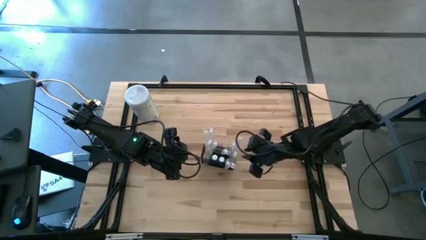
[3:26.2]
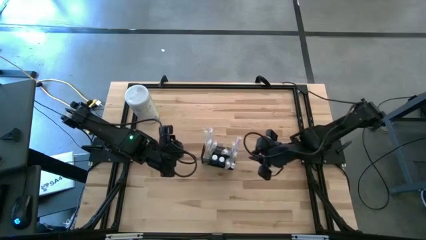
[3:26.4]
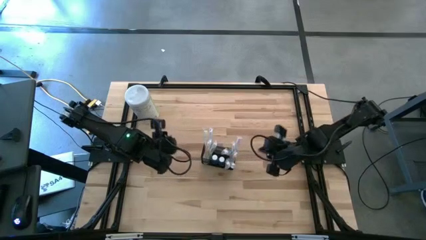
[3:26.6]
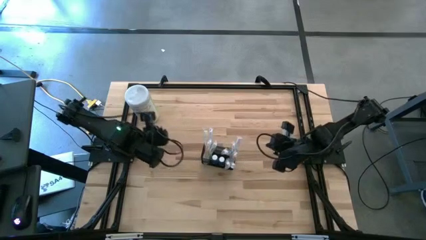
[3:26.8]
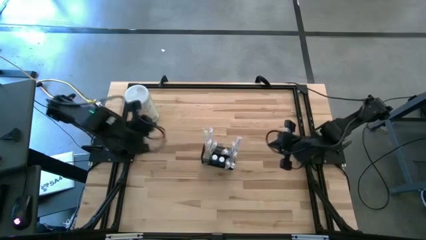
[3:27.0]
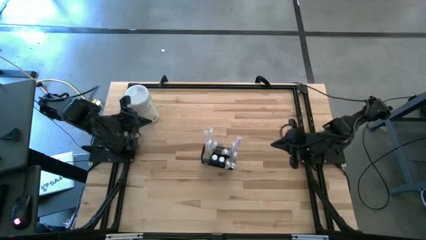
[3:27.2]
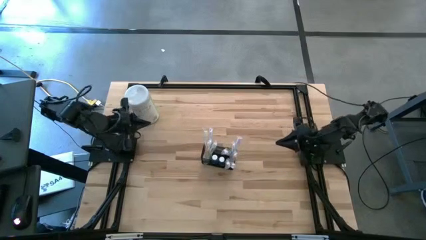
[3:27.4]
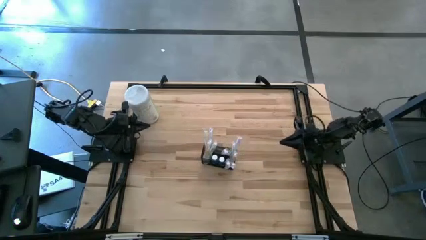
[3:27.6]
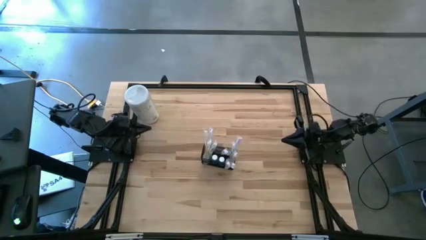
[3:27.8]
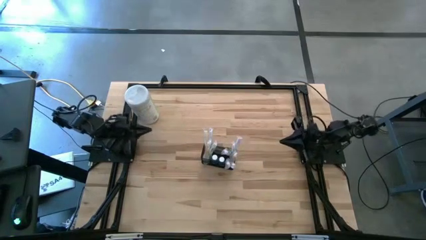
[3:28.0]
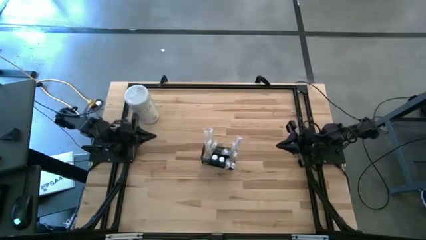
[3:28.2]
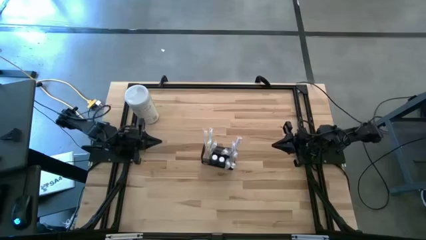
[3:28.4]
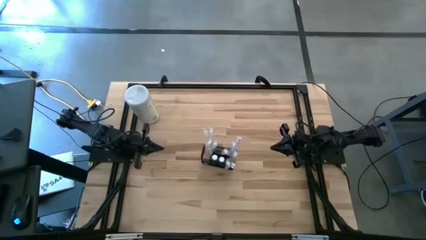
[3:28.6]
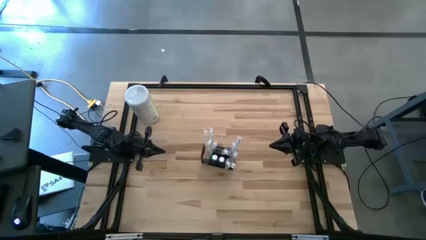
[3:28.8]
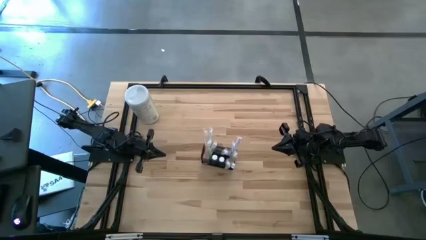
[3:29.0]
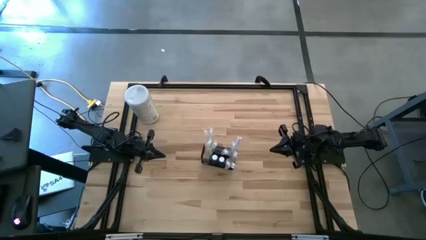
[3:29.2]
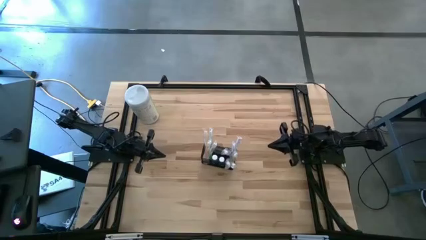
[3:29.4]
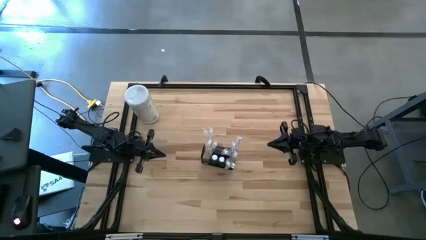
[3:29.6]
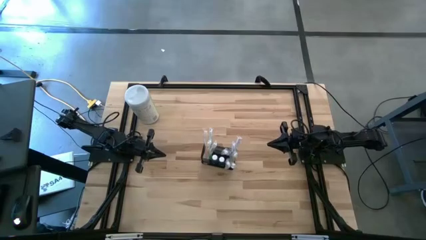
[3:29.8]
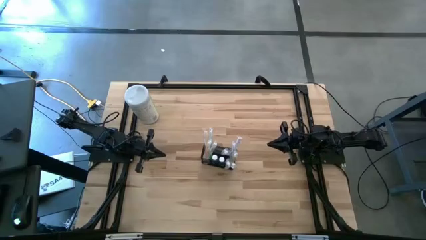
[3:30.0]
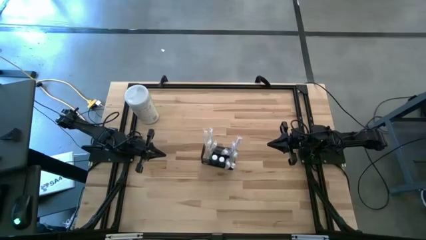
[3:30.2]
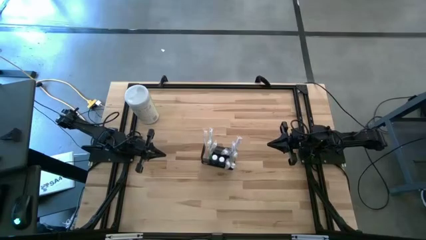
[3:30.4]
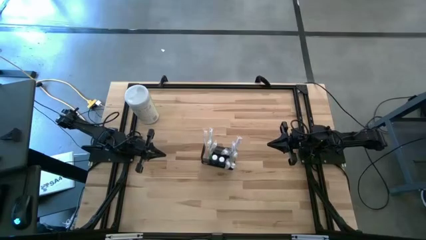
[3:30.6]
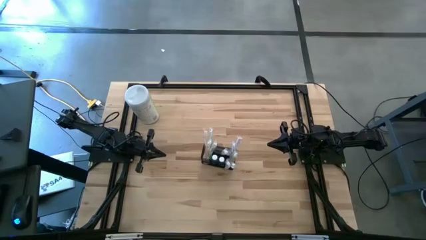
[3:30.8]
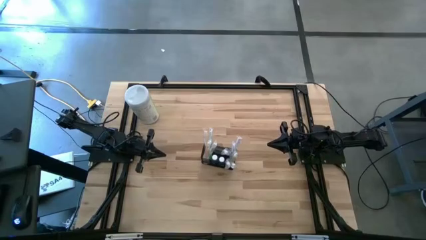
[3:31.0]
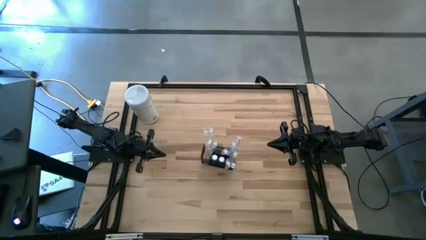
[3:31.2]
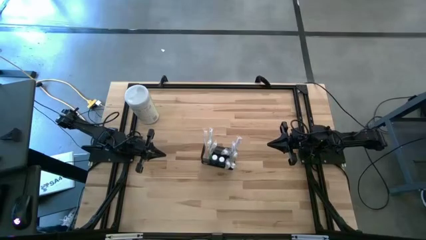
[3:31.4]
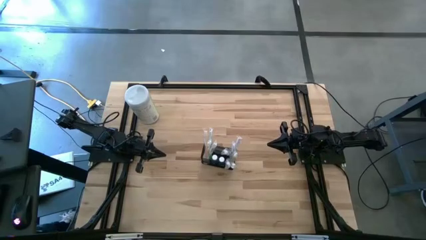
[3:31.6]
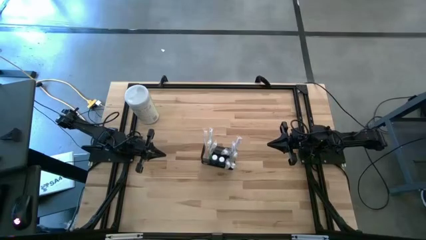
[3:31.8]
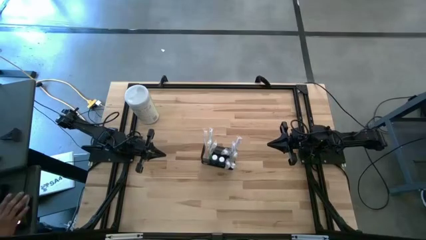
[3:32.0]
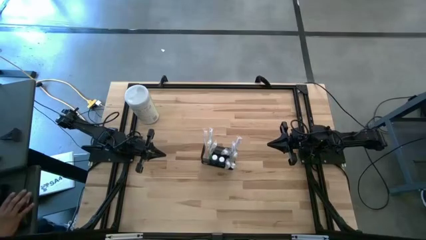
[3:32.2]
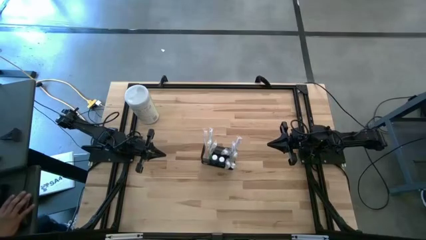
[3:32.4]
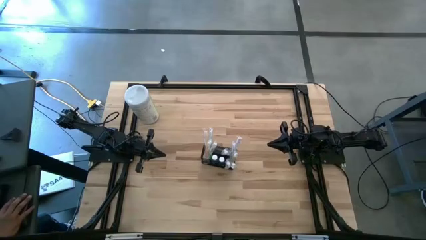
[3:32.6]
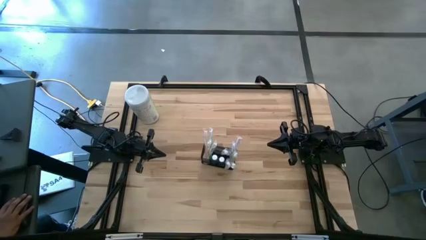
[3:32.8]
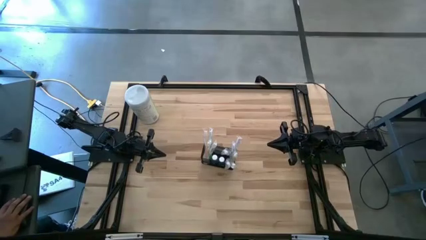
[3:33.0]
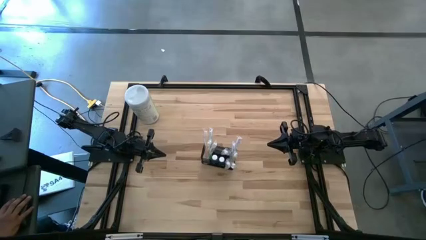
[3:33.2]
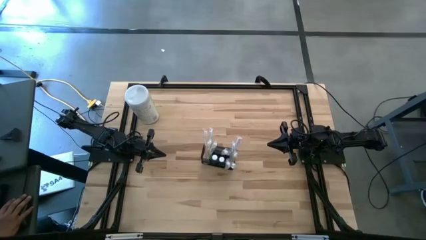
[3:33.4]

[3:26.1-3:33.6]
Task: Pick & Place toothbrushing station
Return to Home Position

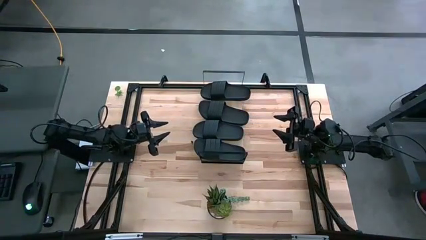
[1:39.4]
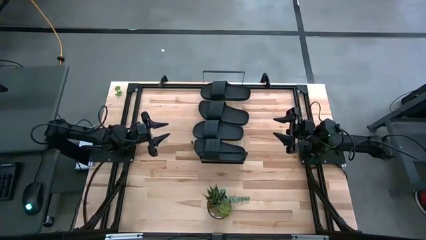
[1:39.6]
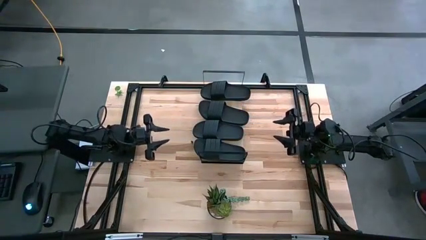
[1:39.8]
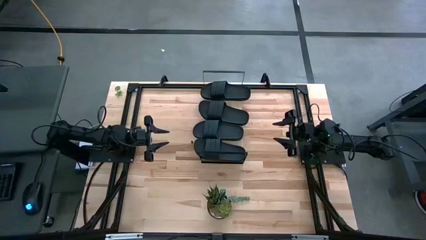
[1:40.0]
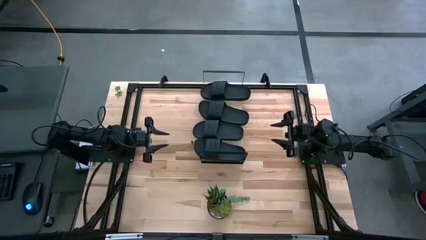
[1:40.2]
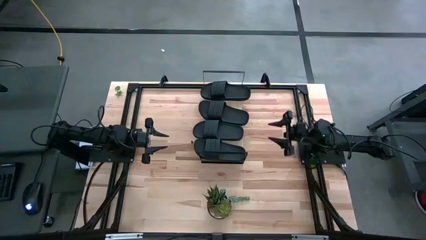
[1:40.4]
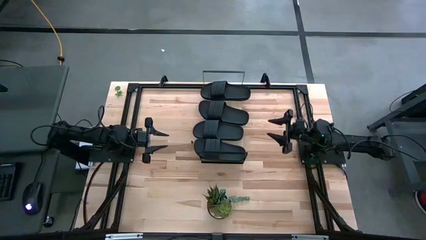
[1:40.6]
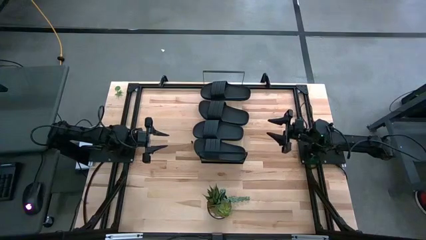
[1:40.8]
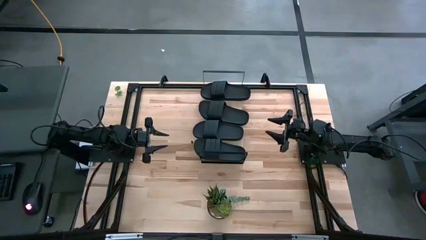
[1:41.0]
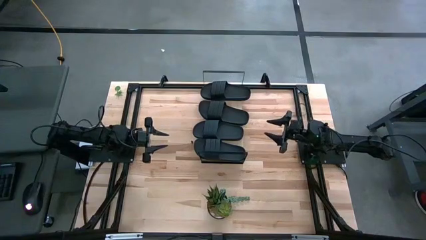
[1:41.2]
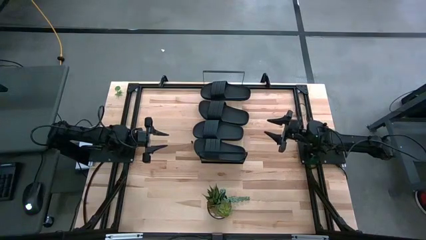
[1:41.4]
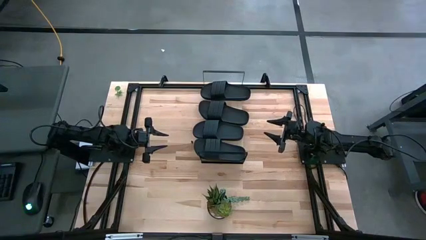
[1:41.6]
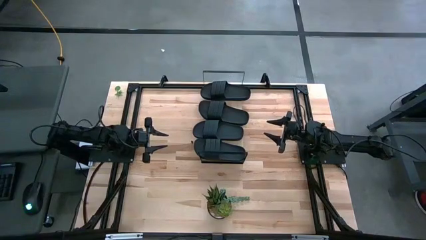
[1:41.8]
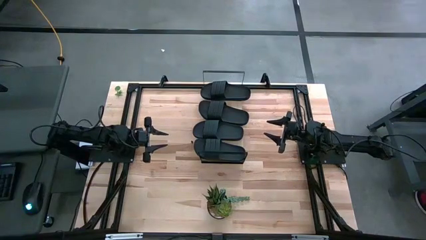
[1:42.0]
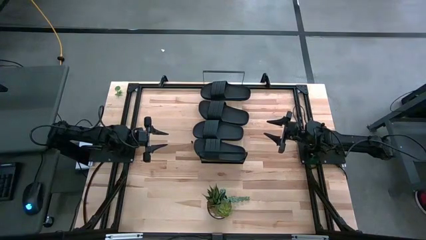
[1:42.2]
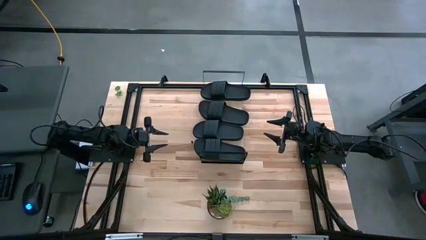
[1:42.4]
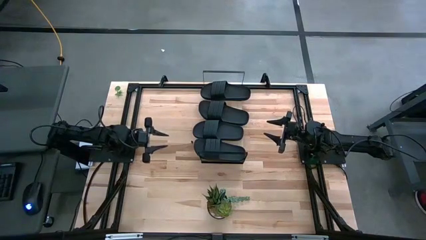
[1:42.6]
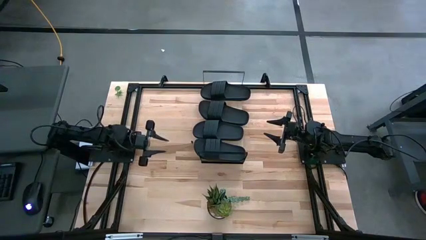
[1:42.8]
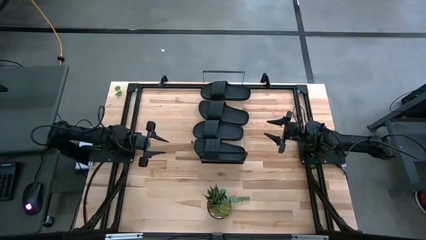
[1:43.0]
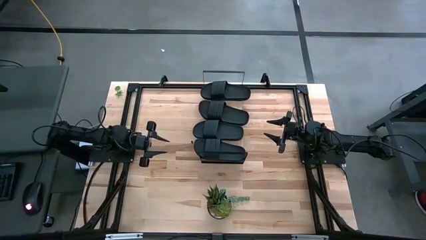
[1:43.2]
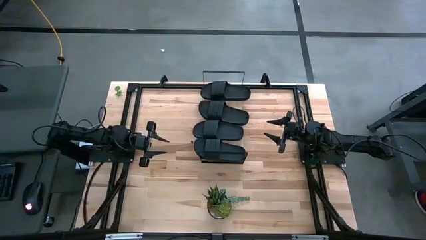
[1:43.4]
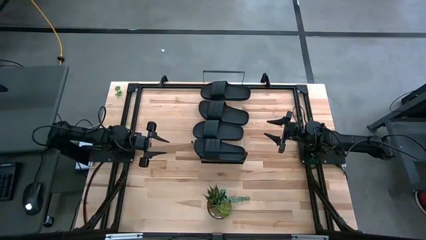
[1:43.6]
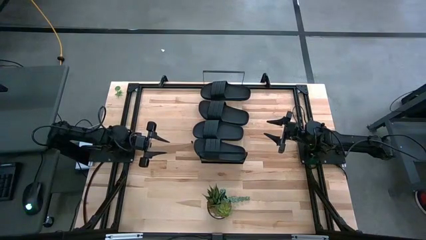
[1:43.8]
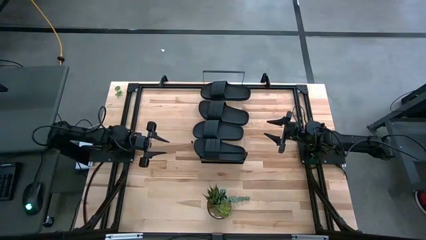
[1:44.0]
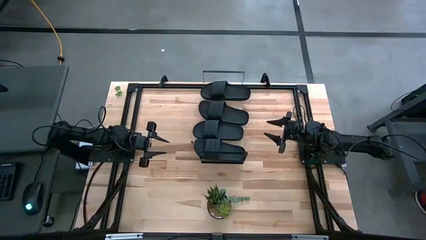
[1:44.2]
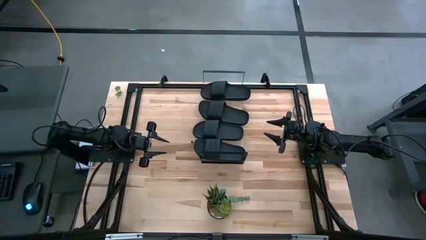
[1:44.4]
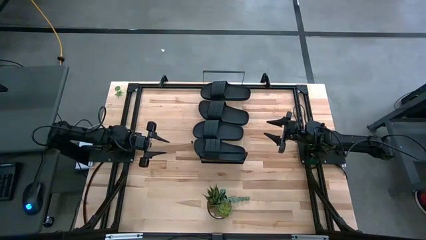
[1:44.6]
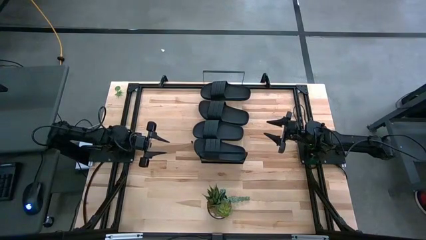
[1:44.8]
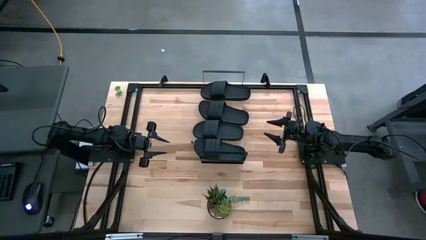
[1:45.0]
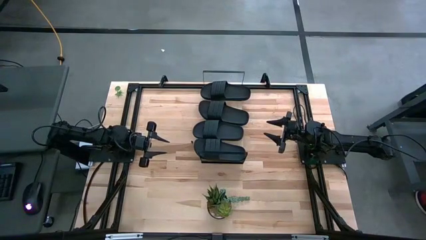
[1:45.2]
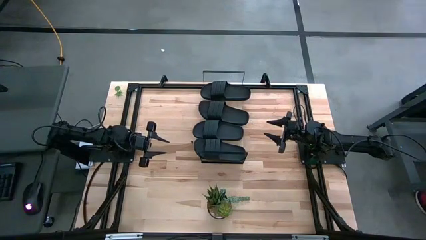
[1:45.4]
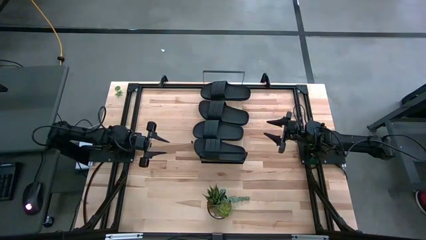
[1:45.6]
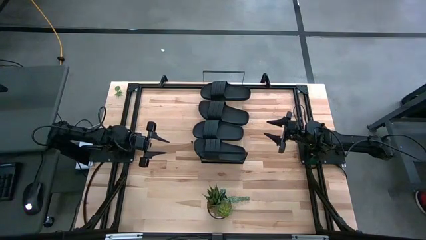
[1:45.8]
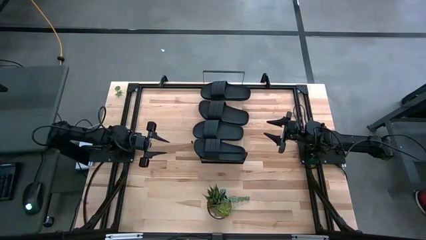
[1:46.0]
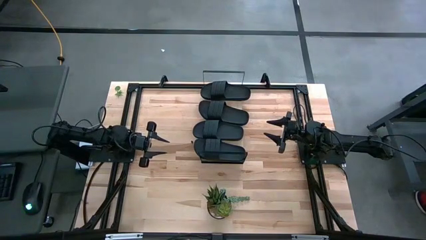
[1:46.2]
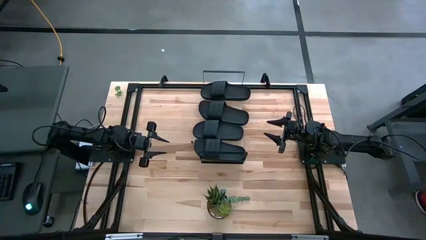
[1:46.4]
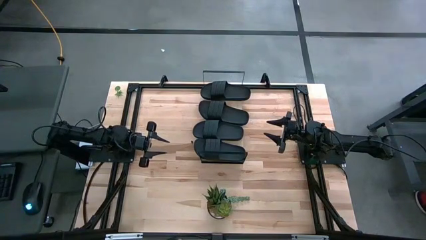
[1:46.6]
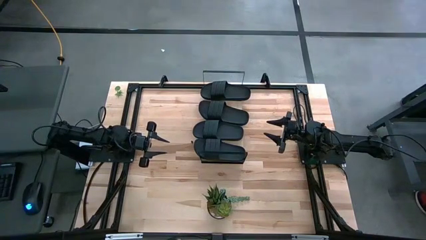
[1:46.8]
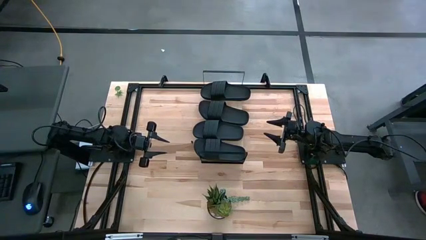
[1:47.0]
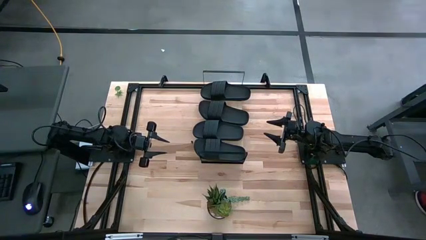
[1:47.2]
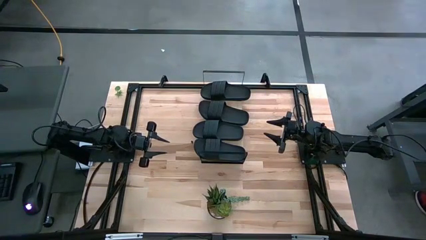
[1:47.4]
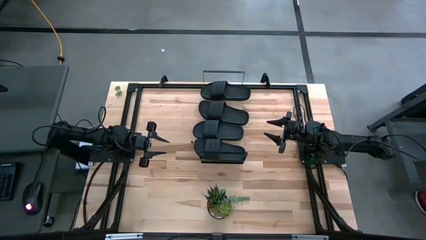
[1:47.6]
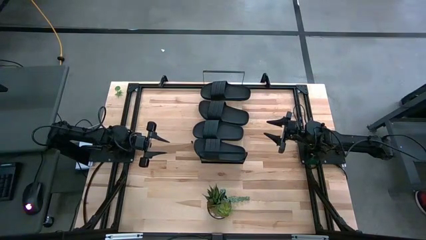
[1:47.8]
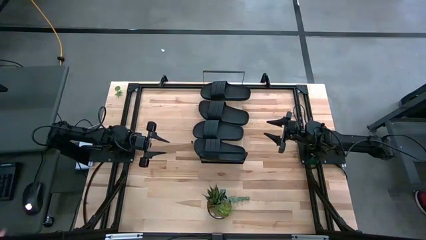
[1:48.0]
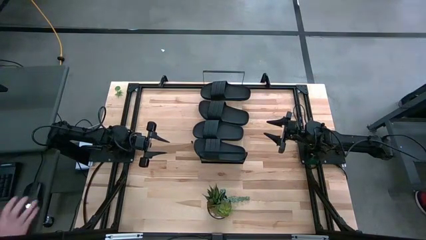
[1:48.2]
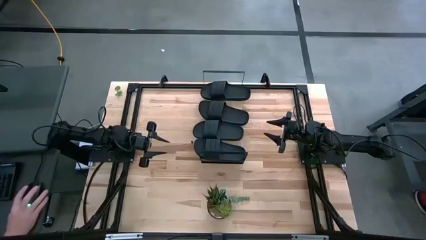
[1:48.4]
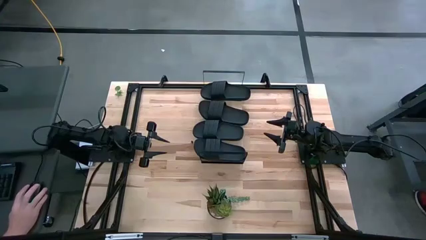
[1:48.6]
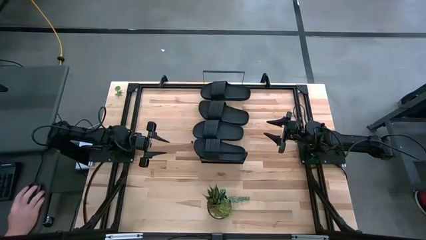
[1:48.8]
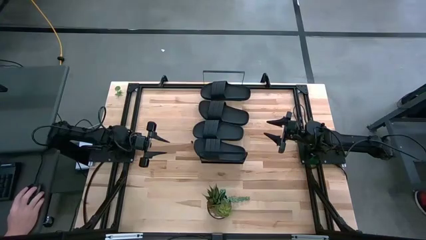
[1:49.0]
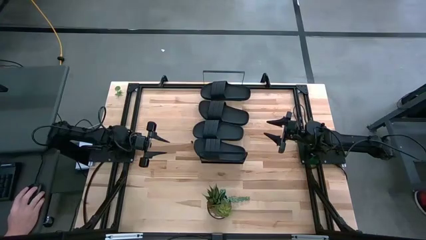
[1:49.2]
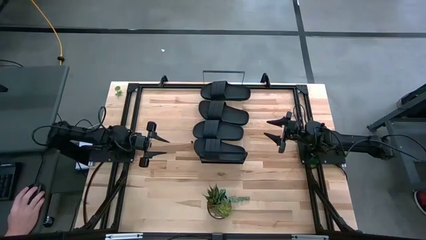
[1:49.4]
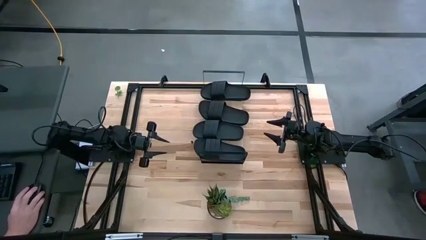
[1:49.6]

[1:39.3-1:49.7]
Task: Pick and place slides into the shelf
Return to Home Position
